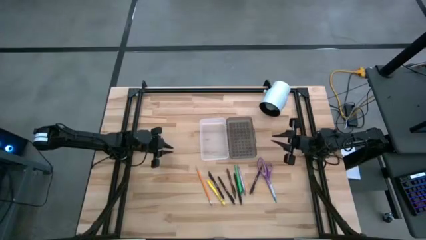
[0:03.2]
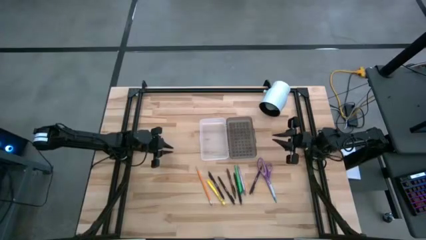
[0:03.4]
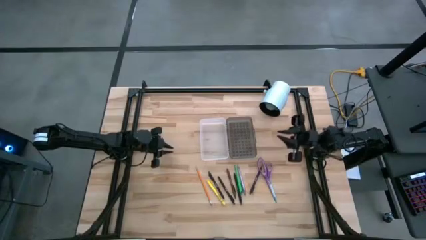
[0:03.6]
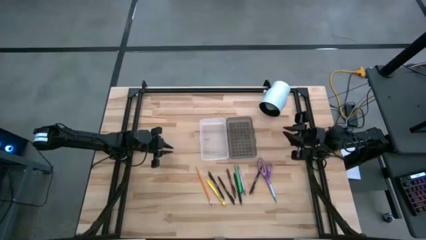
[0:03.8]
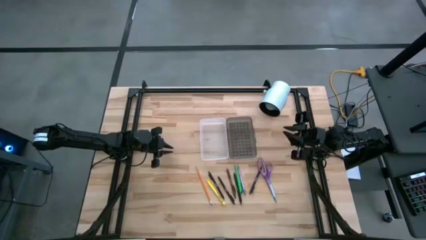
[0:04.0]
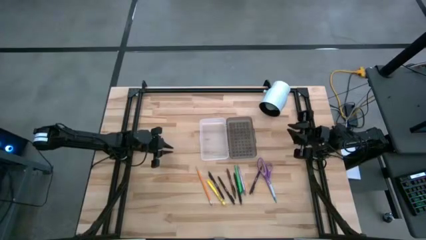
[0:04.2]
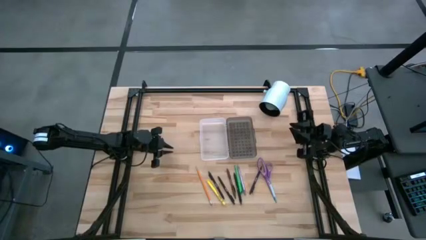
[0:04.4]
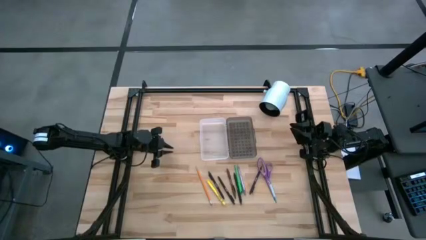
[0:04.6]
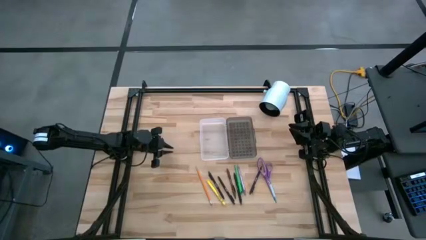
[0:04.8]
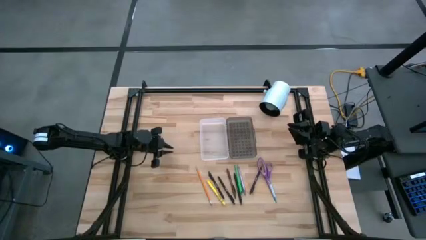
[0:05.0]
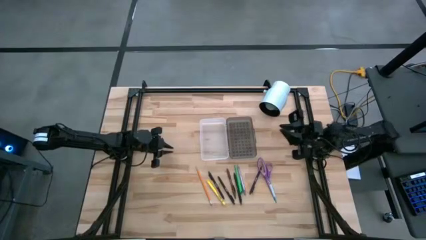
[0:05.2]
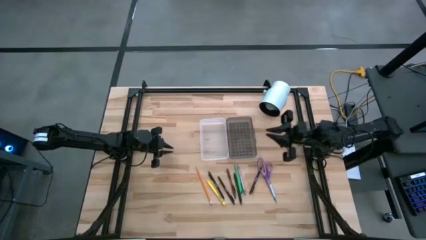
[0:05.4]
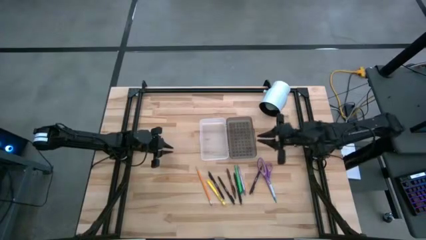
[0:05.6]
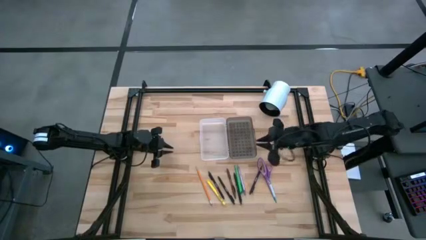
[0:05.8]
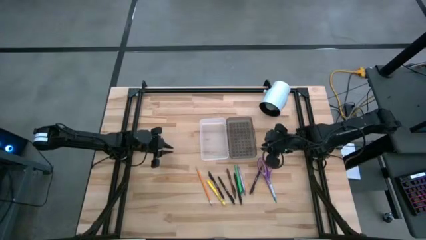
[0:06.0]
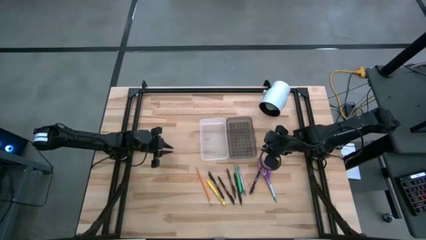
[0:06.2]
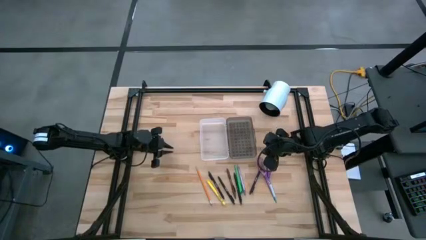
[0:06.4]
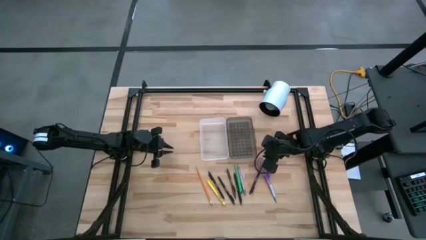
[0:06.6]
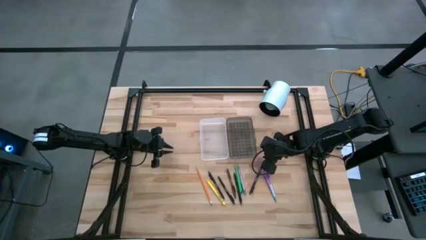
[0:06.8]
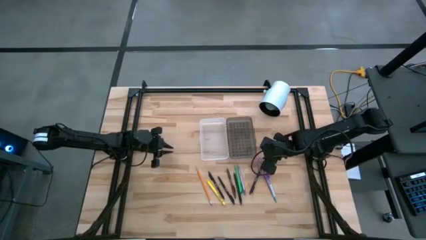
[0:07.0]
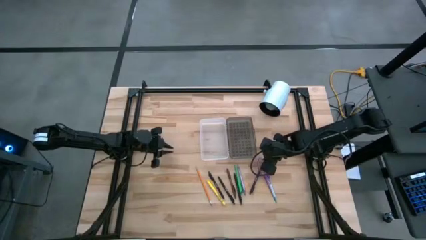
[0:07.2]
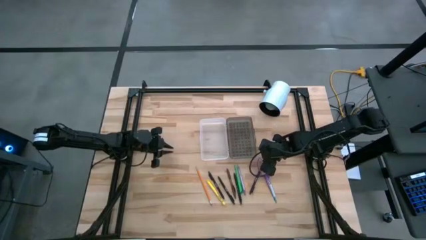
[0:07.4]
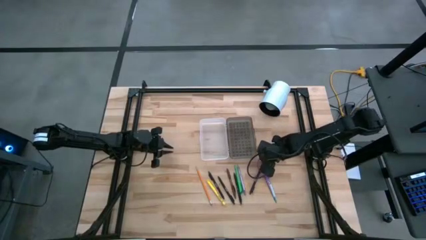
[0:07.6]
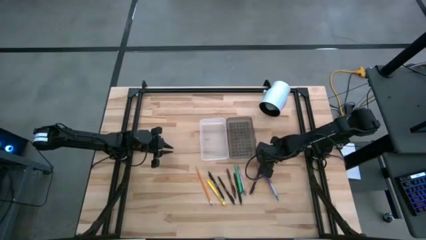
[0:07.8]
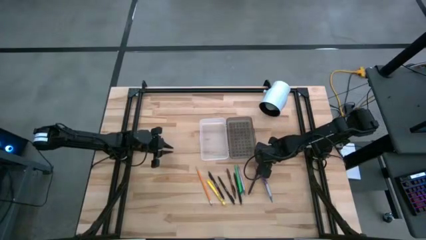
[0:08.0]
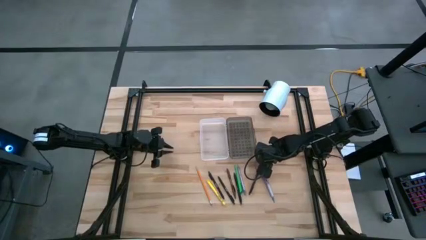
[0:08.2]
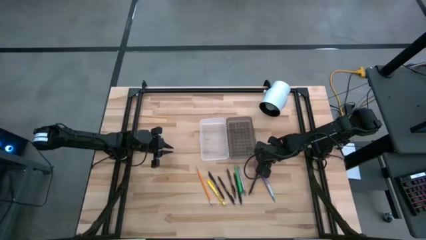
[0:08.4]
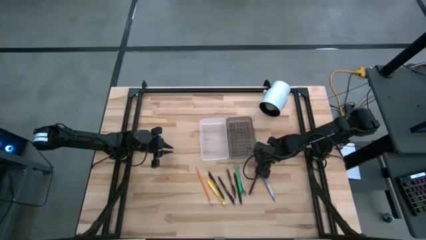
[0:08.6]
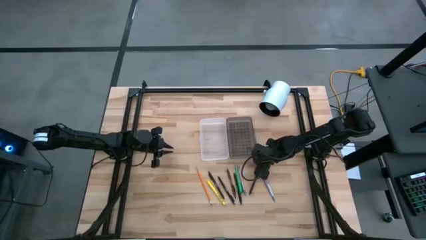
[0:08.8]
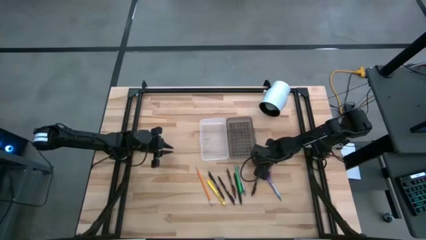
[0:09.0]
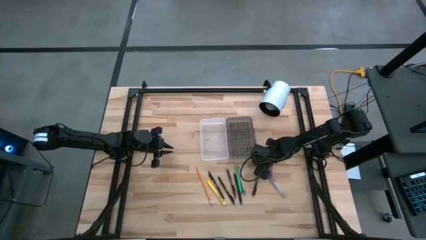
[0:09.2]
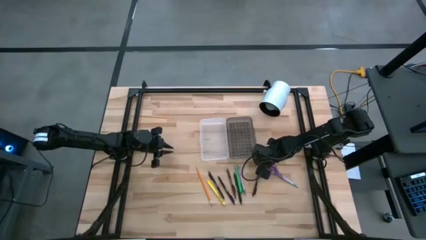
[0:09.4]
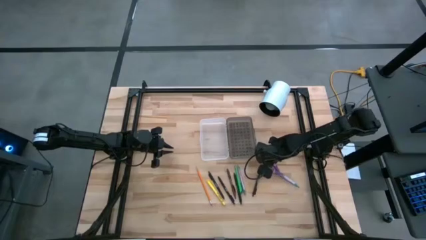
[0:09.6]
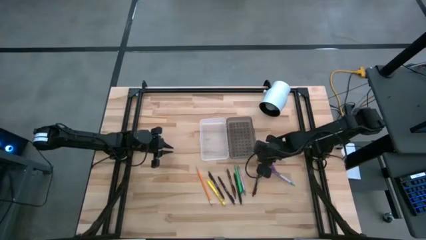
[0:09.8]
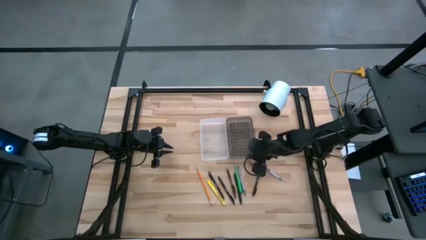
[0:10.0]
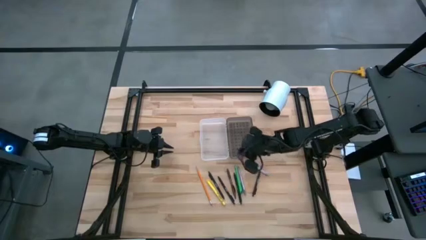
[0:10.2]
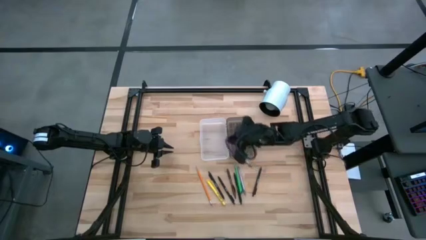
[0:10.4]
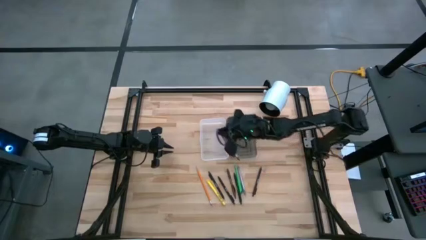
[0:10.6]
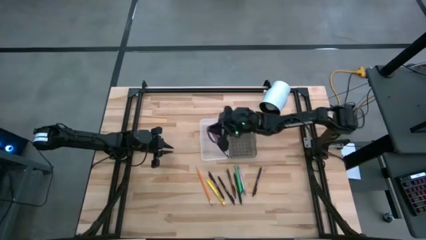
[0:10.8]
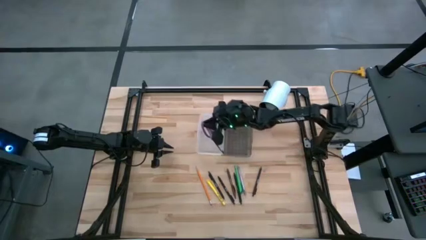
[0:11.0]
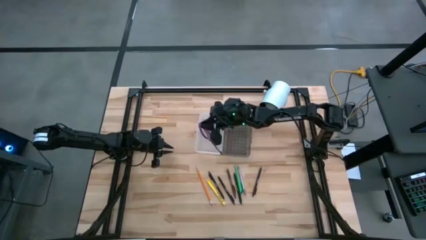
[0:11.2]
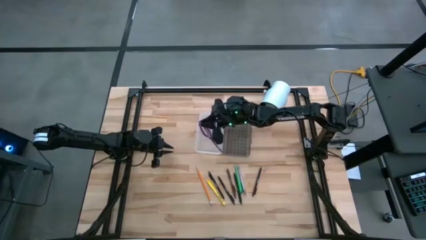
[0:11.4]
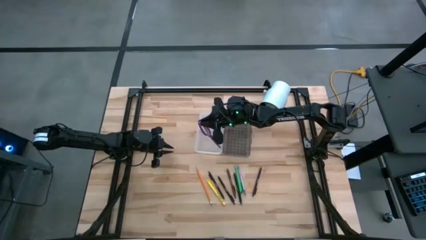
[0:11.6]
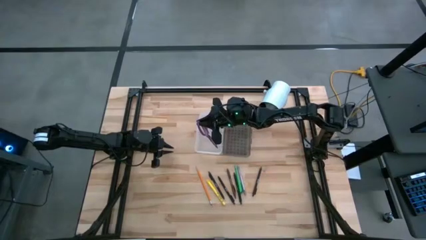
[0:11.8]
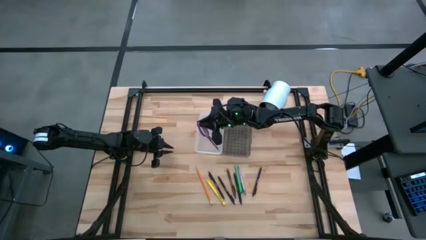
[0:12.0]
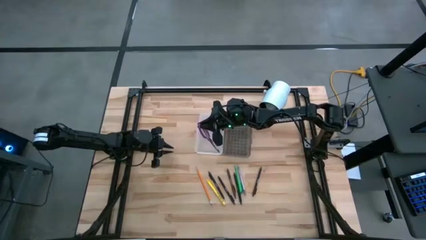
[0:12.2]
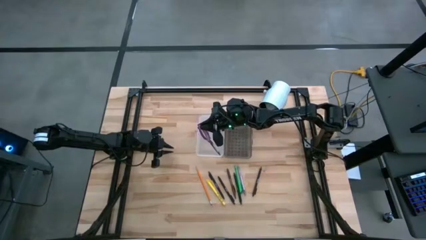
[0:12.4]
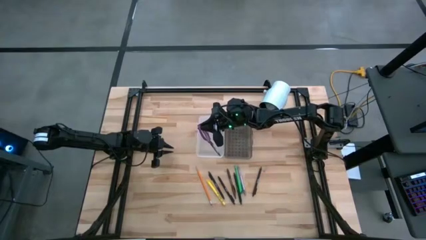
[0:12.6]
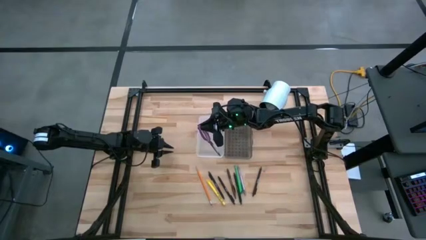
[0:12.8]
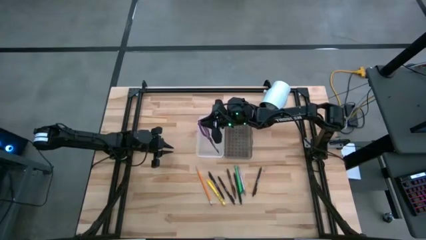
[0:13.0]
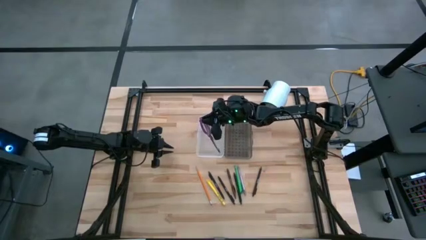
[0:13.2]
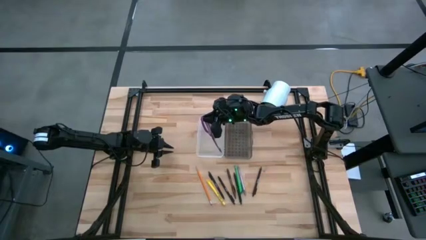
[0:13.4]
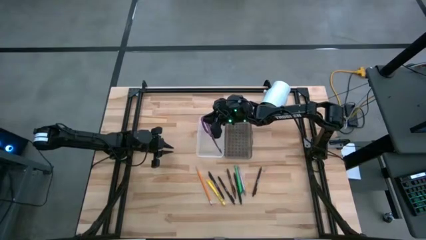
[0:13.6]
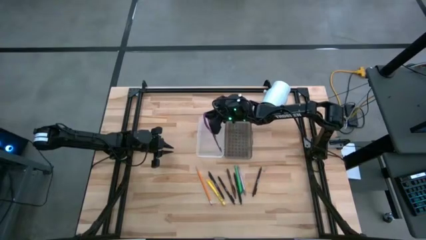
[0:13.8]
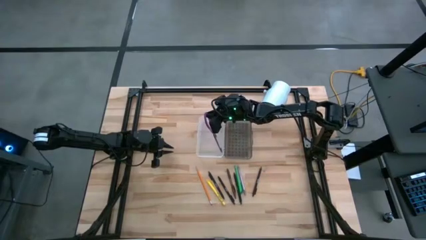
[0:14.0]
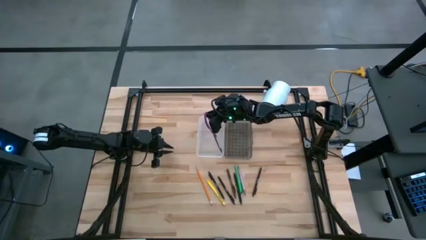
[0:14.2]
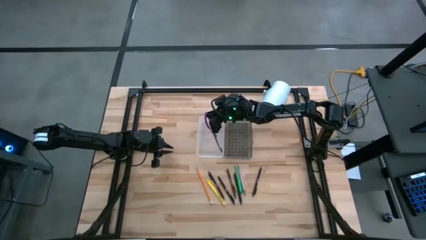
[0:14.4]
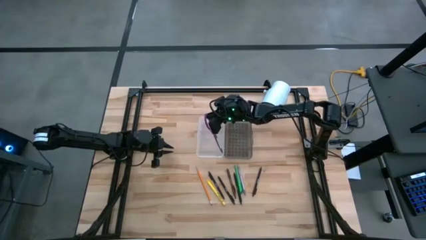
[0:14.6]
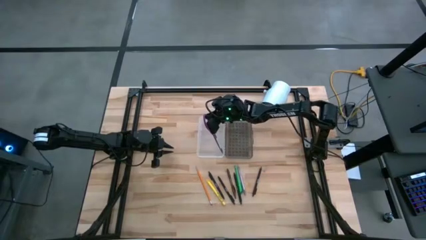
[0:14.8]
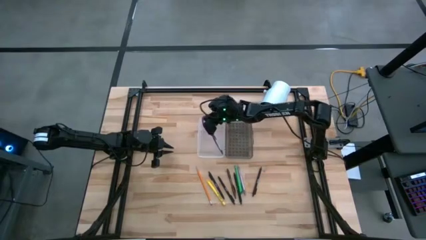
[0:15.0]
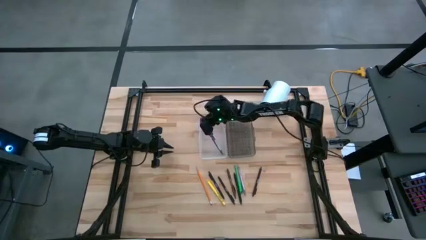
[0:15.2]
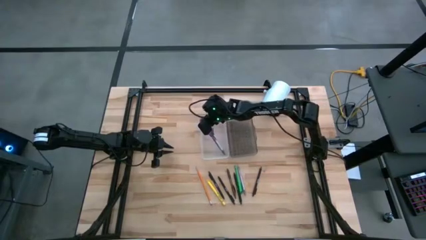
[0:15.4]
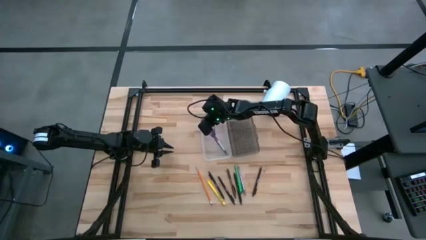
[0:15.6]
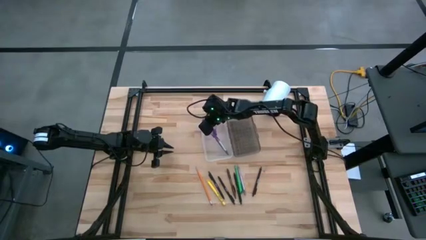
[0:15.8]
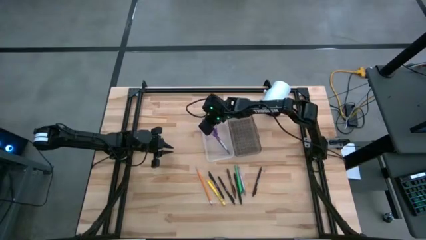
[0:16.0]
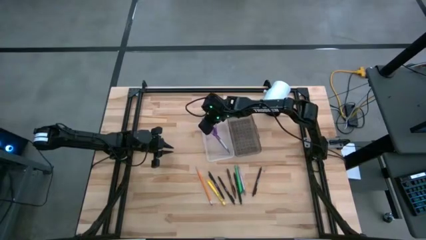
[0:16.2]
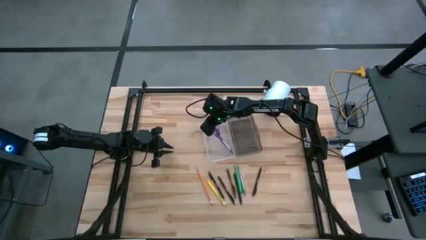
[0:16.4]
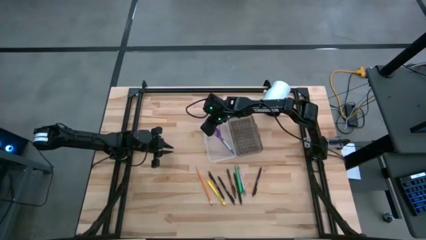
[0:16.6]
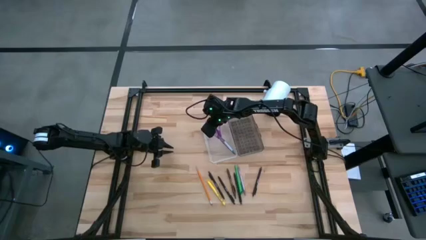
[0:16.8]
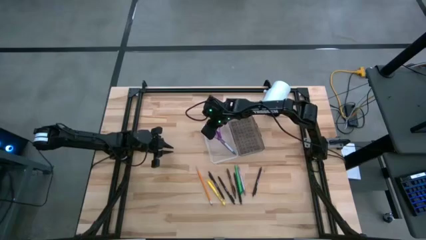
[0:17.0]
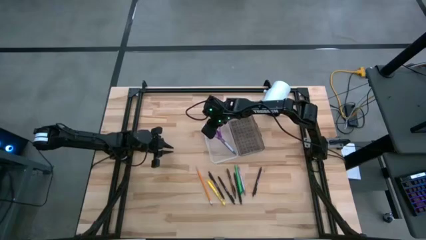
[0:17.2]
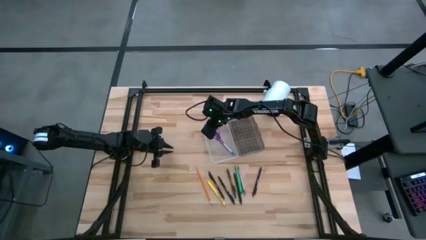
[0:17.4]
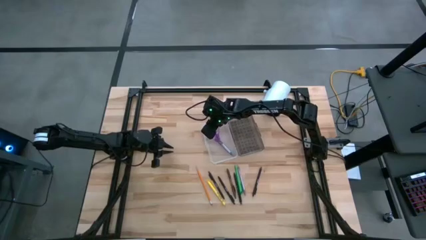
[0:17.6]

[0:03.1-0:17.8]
Task: Pick & place school supplies into a supply box
Put the purple scissor into the supply box

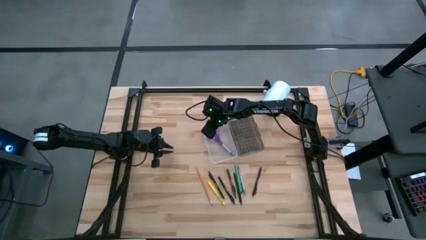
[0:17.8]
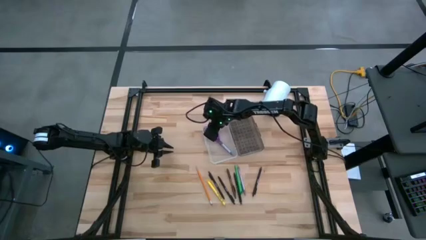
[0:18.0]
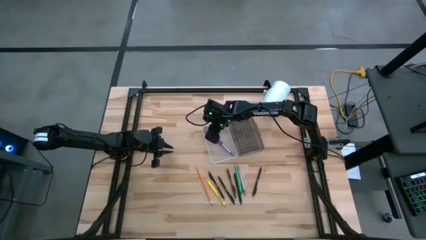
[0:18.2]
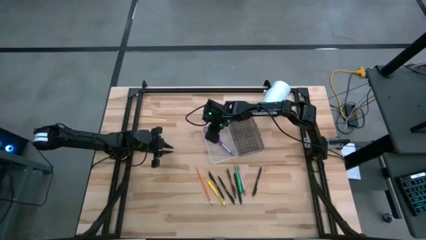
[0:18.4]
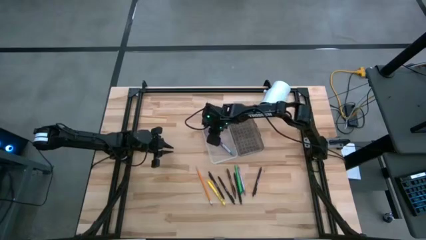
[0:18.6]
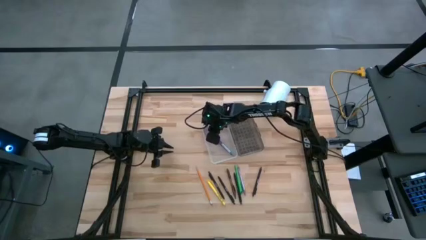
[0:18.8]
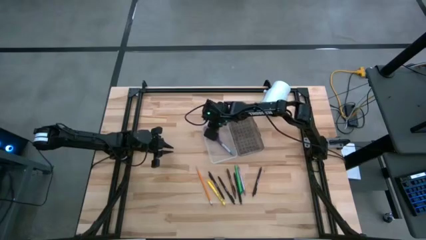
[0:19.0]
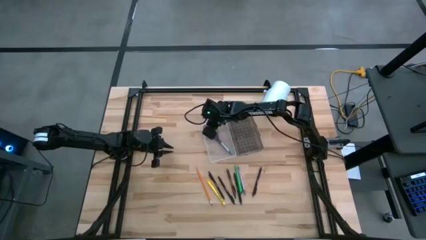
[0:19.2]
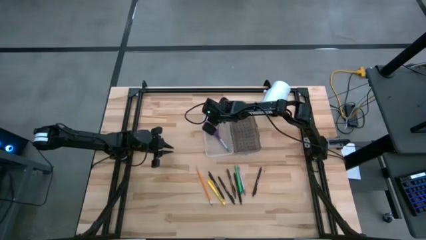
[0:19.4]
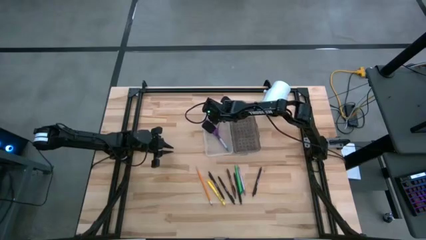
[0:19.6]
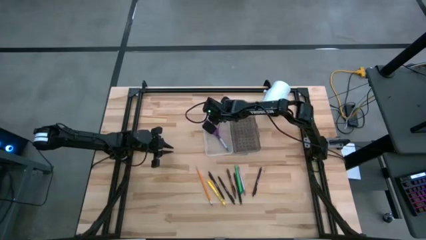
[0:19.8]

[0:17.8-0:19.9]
Adjust the supply box on the table
